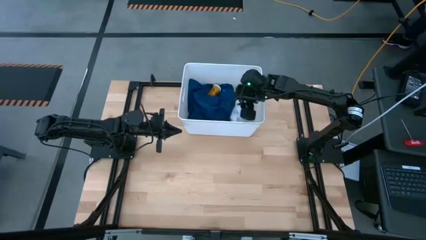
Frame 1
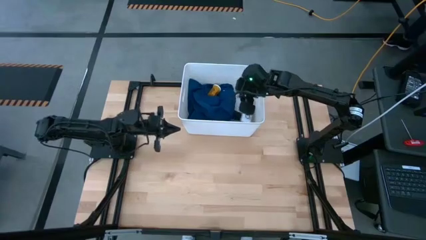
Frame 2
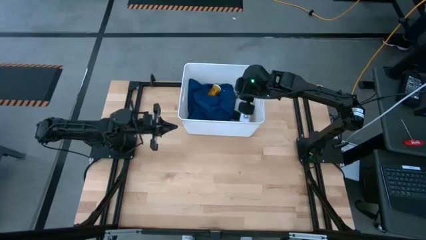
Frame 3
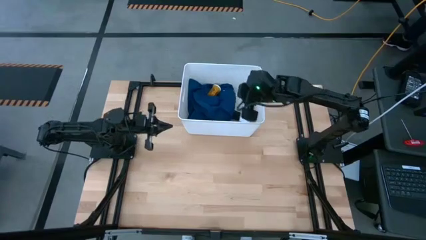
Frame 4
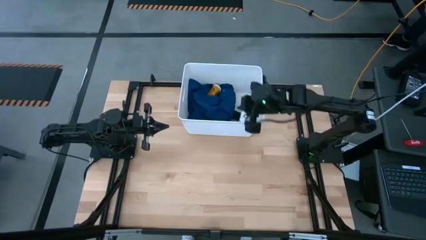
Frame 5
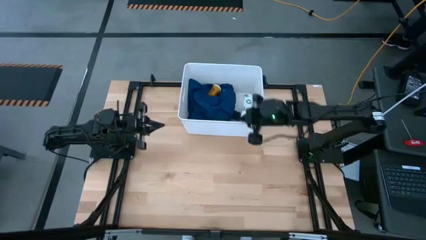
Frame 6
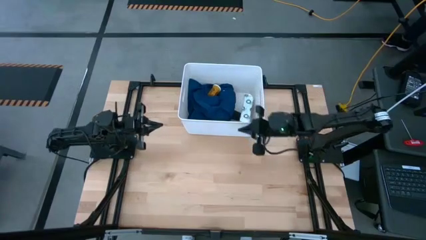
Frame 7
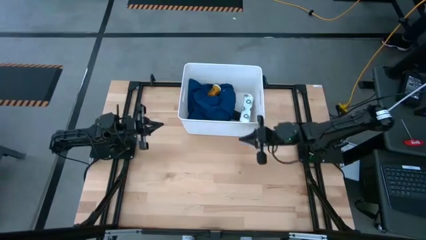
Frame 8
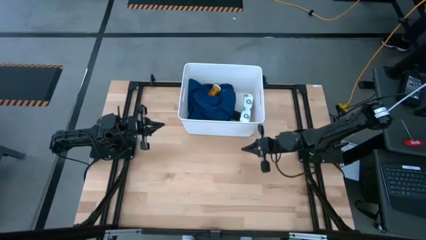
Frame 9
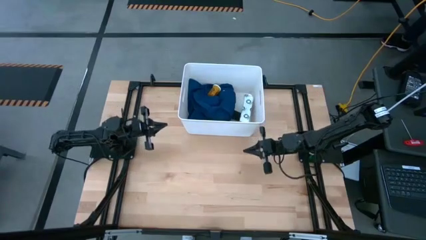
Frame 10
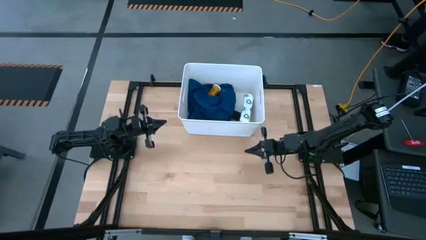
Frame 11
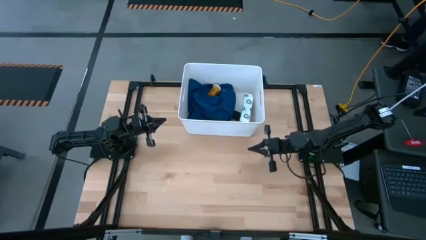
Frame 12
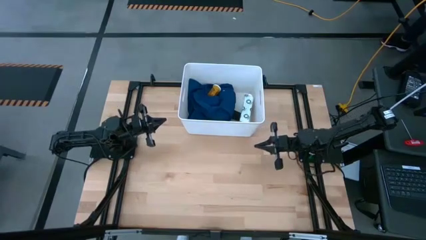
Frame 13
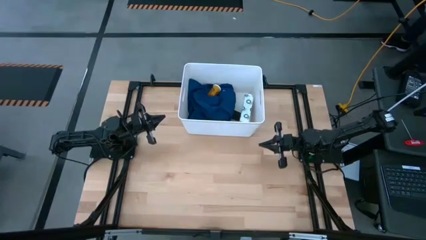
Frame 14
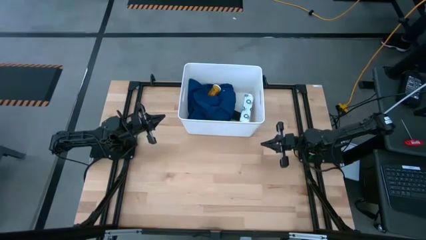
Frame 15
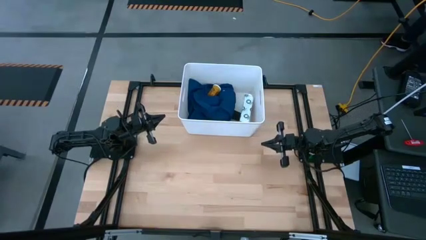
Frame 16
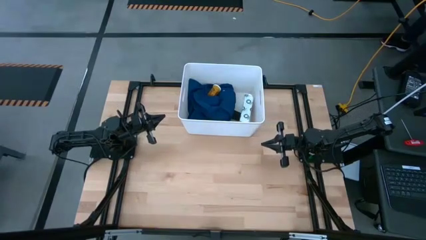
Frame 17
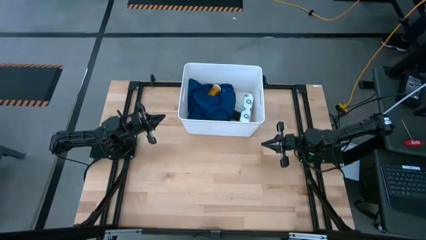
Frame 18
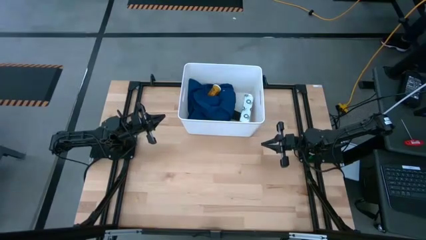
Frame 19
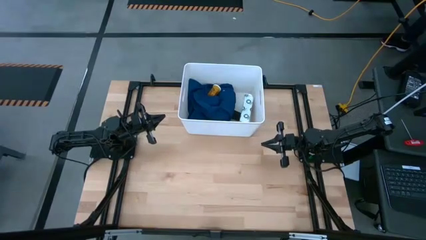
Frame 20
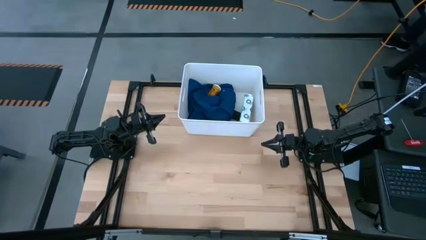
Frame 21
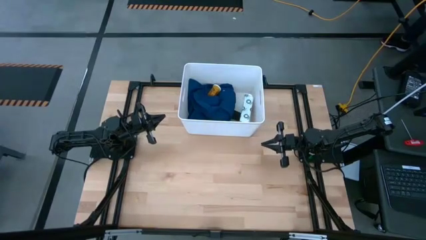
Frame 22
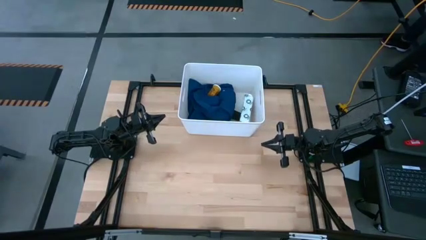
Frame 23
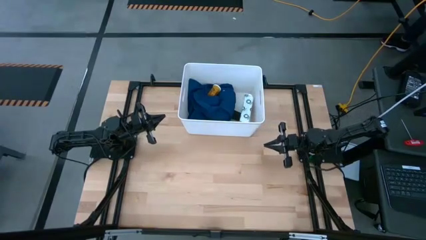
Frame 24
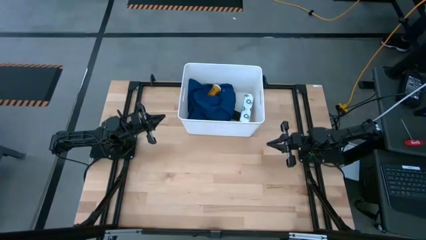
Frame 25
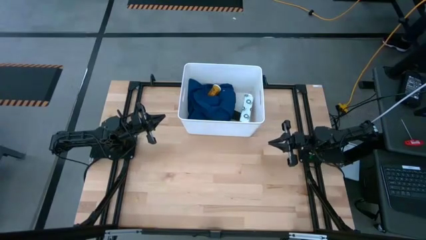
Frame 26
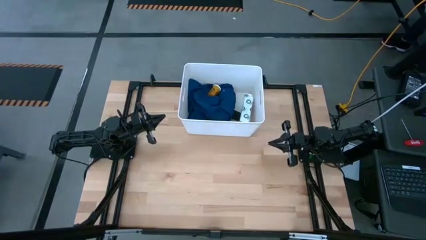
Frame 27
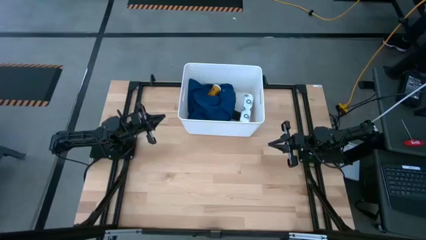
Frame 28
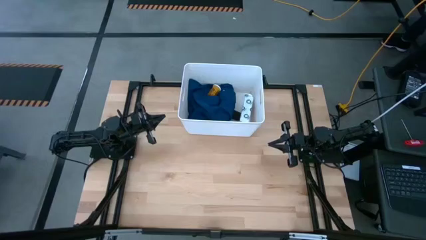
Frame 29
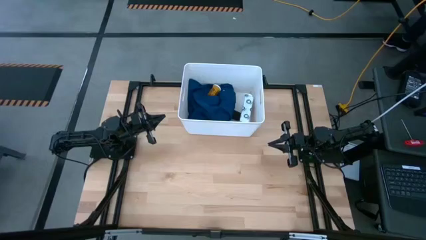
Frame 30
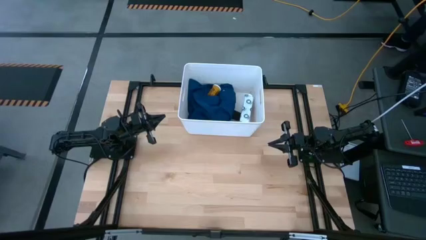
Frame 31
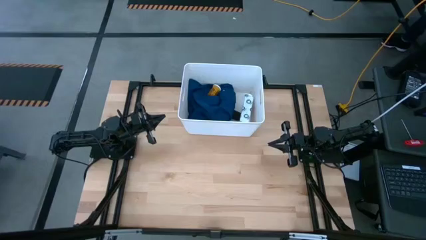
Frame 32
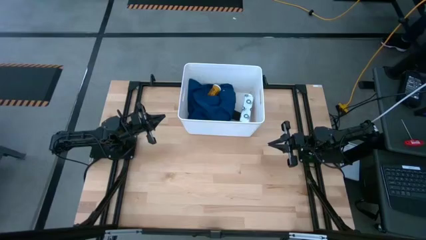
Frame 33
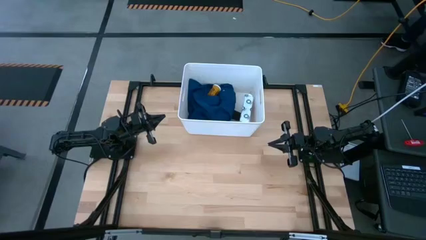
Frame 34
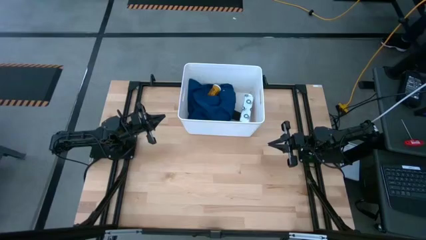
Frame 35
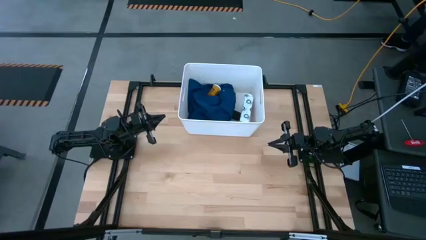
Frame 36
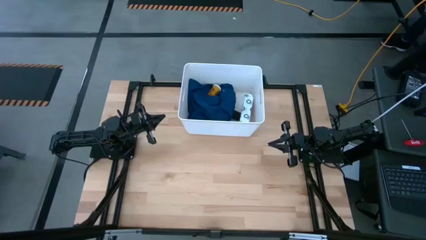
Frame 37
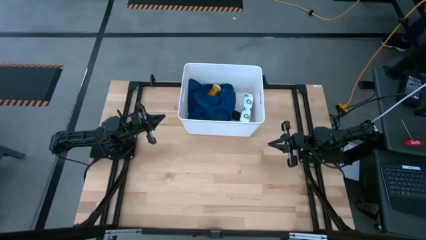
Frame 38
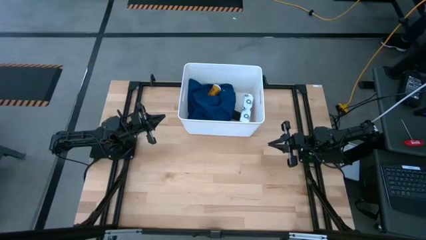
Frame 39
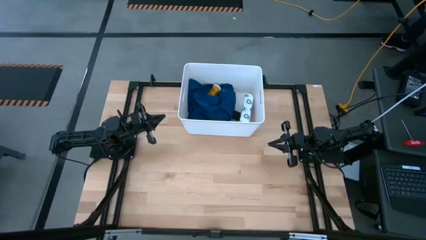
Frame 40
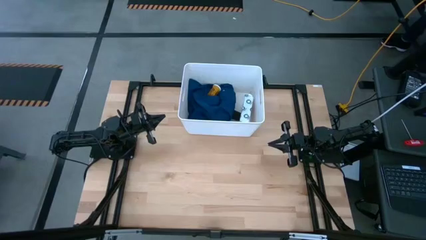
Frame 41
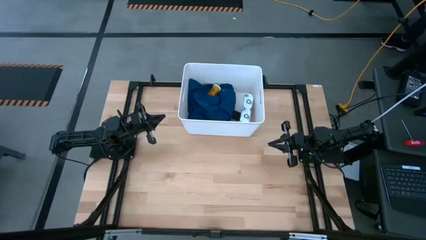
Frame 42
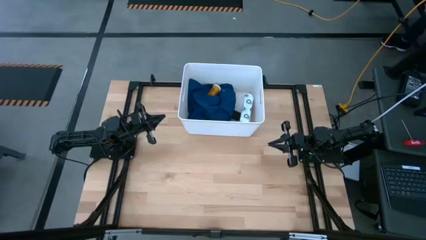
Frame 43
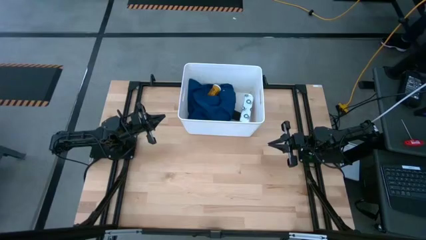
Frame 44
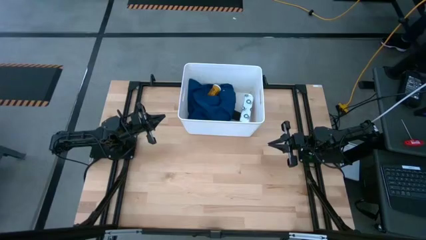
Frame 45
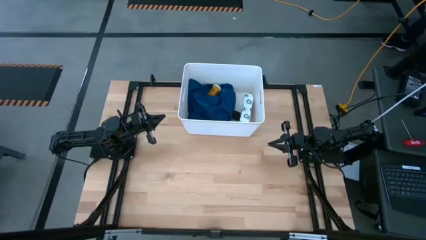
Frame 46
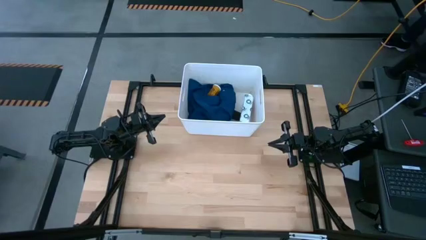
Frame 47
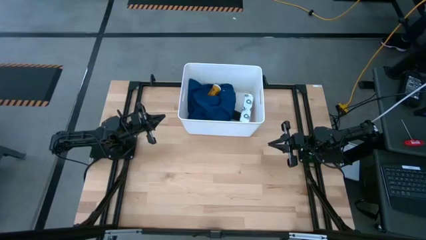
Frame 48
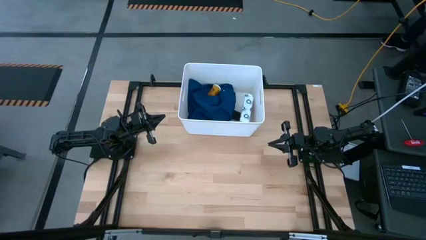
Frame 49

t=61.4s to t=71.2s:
Task: Pick & place medical supplies in basket/bin
Return to Home Position
